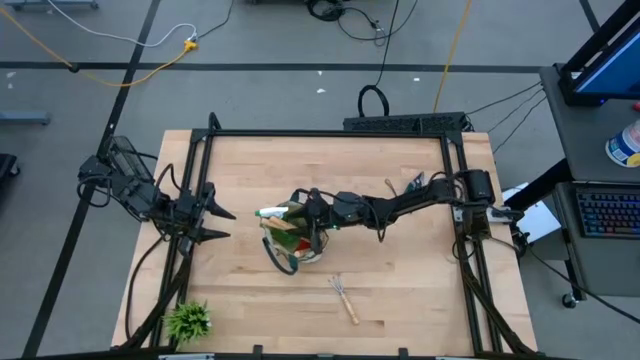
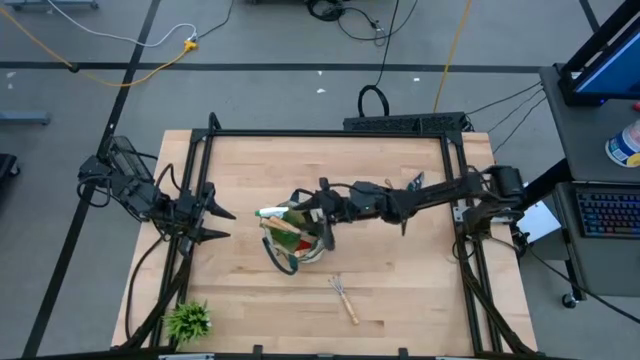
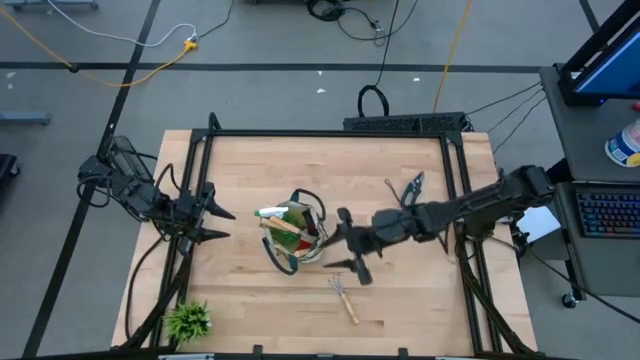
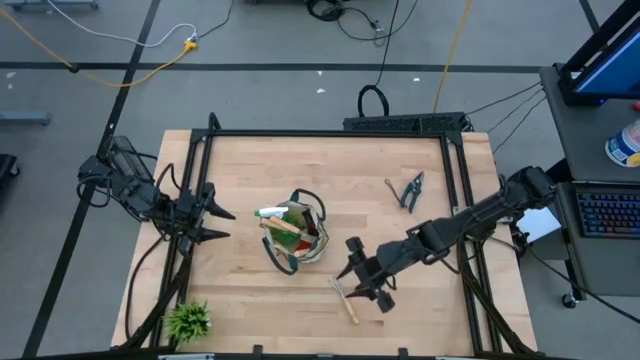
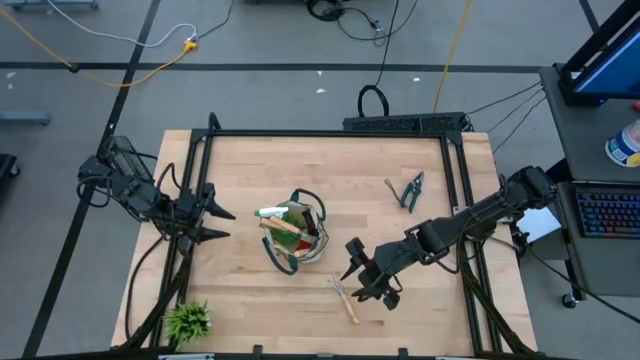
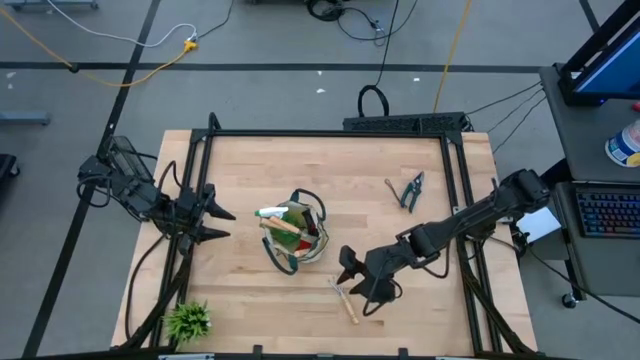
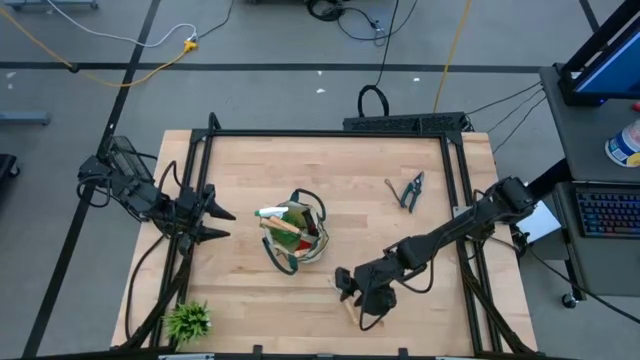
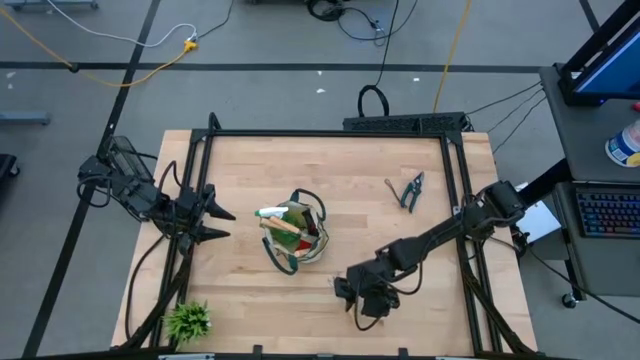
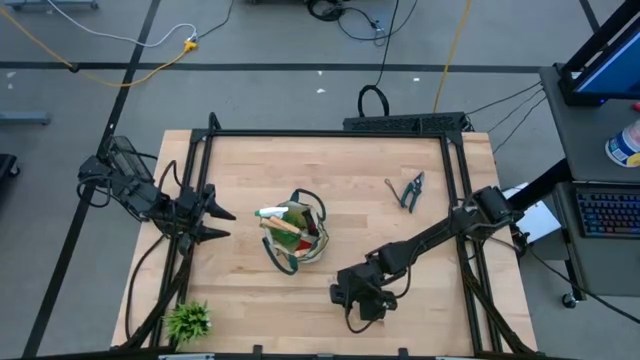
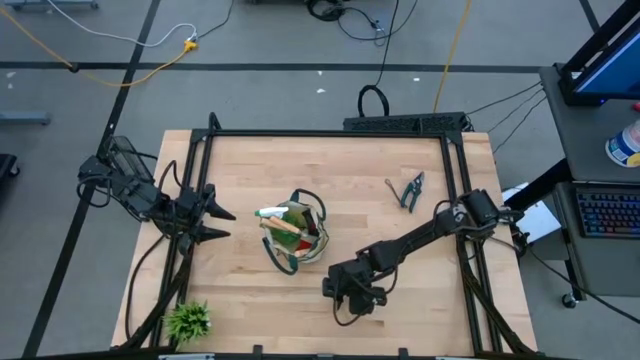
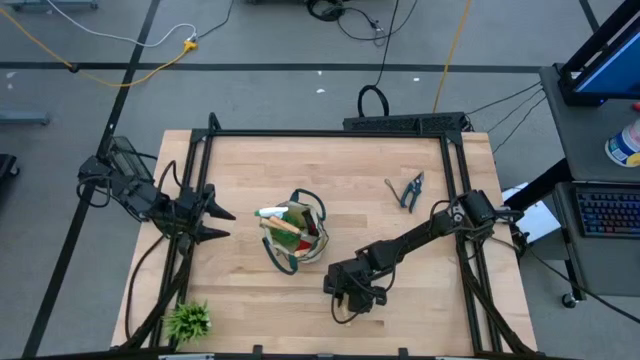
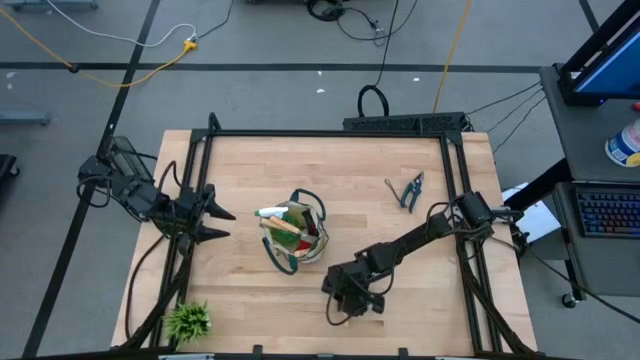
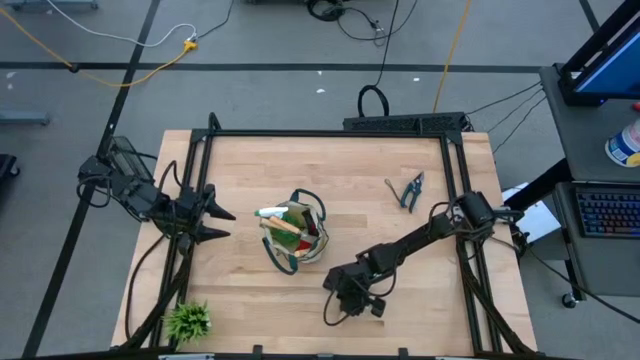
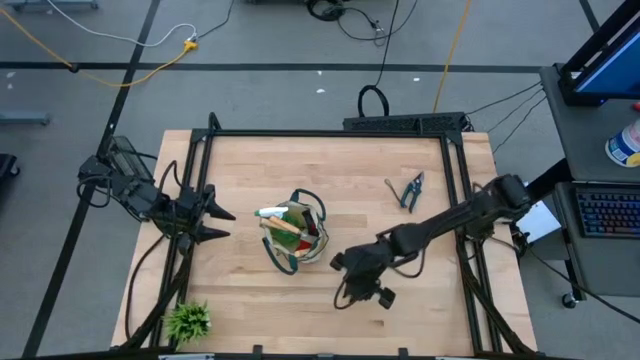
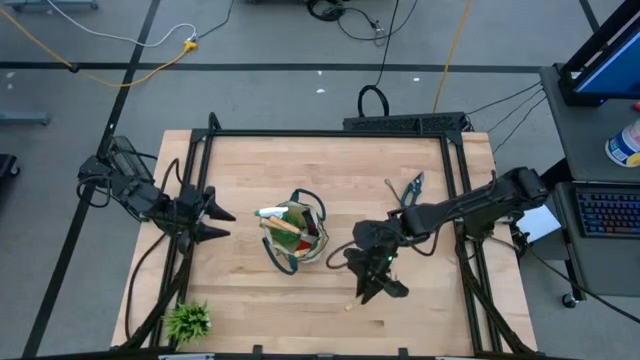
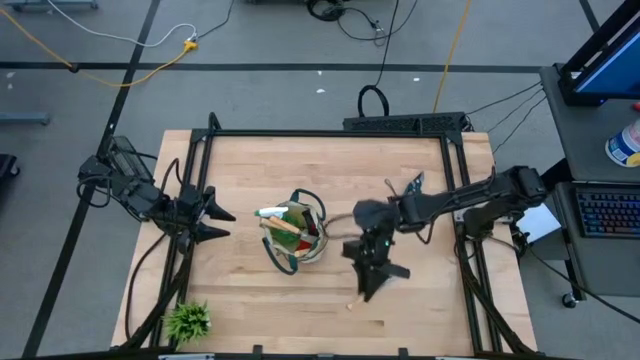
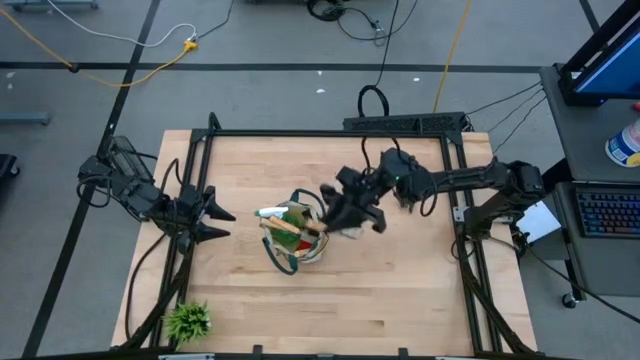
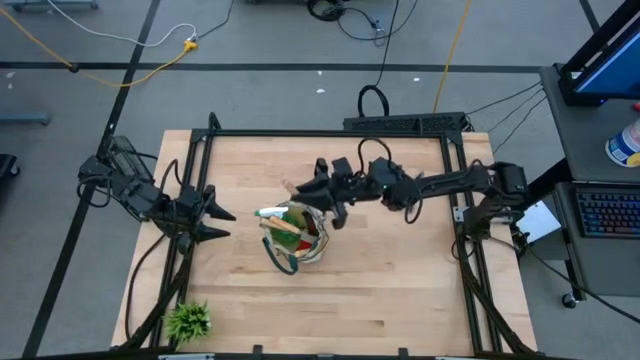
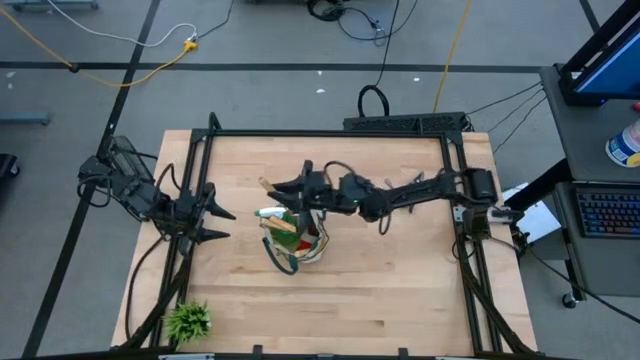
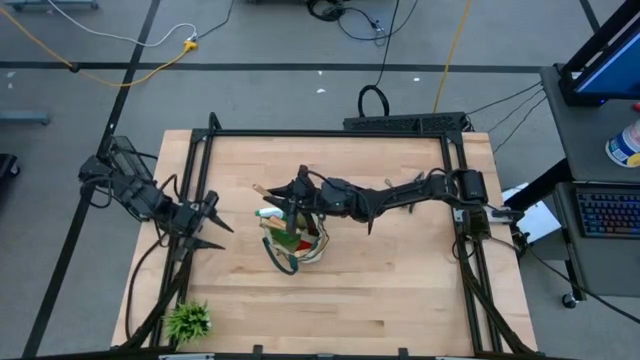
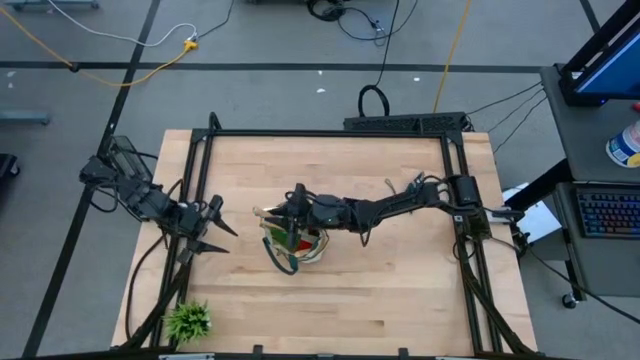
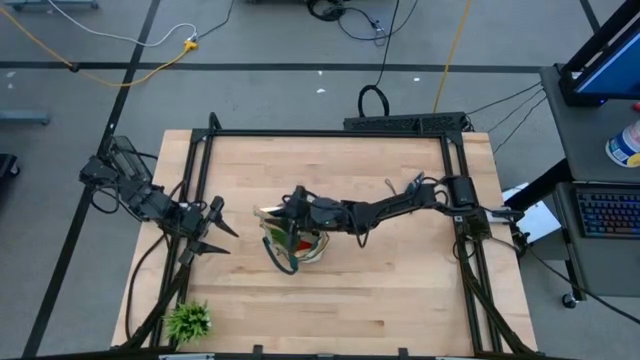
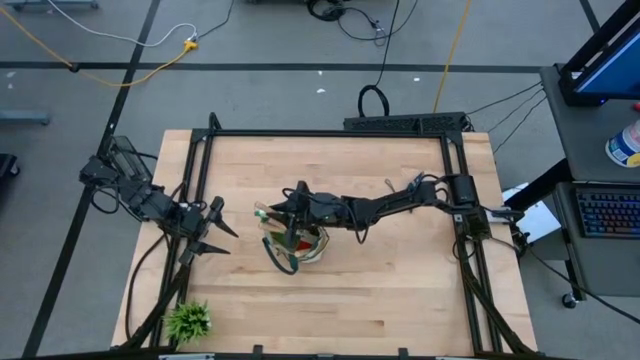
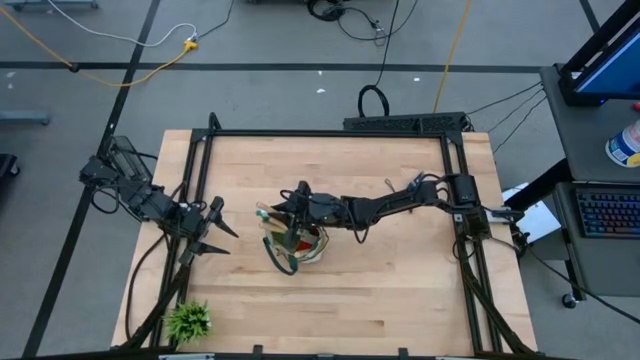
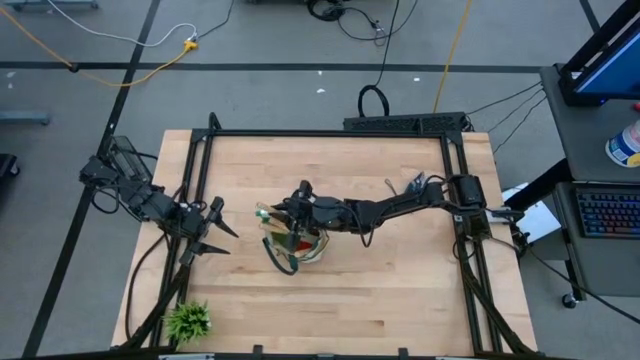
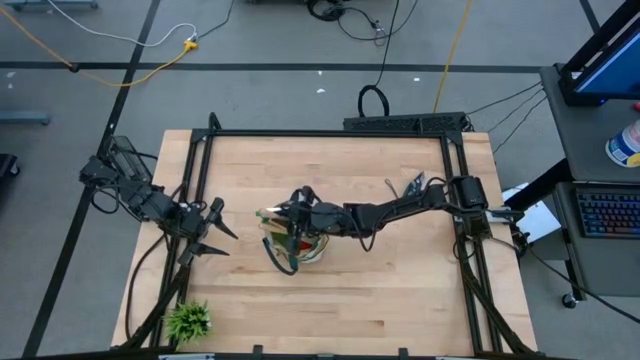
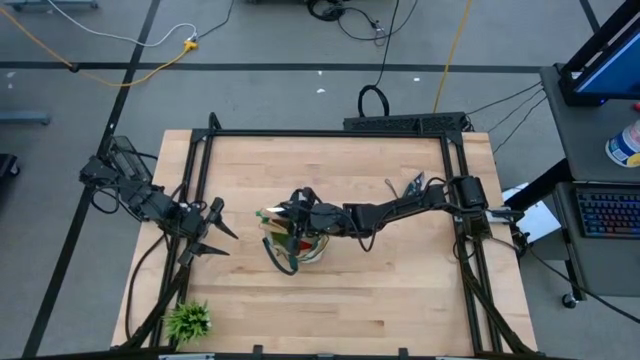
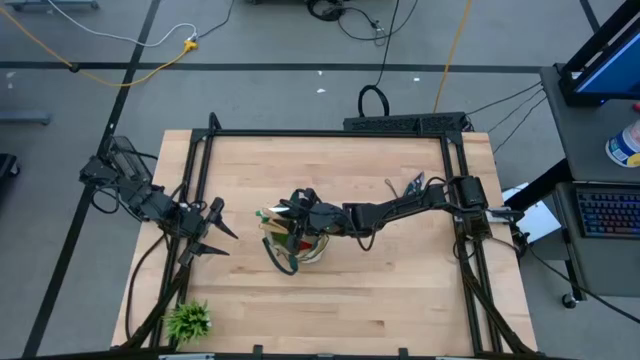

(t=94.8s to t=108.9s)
Task: Pick & Place Garden tools in Gardening bag
Put the hand rake into the gardening bag

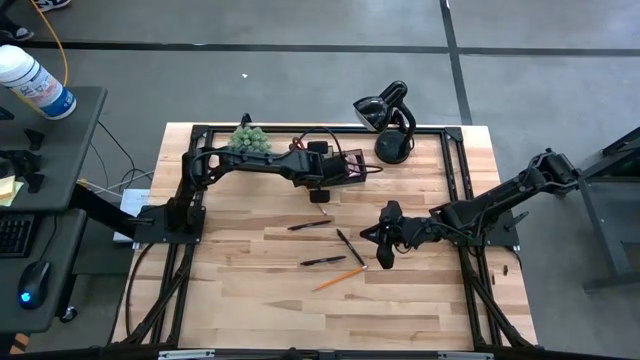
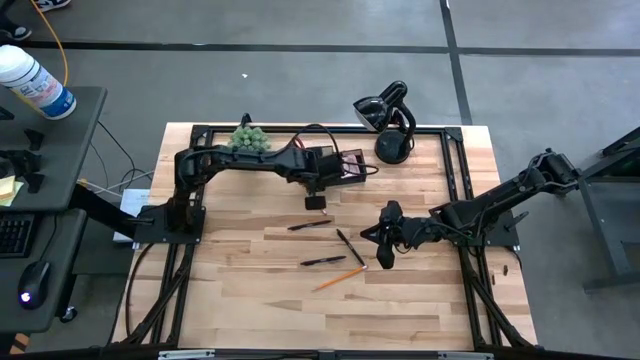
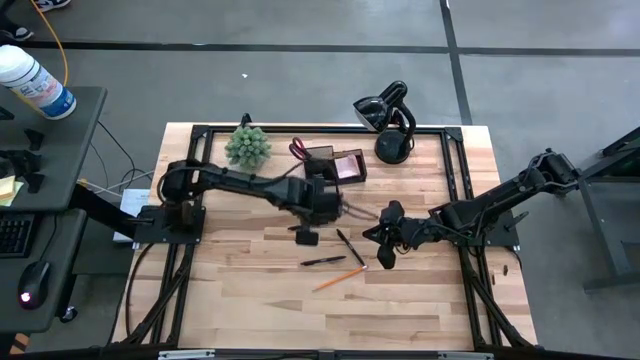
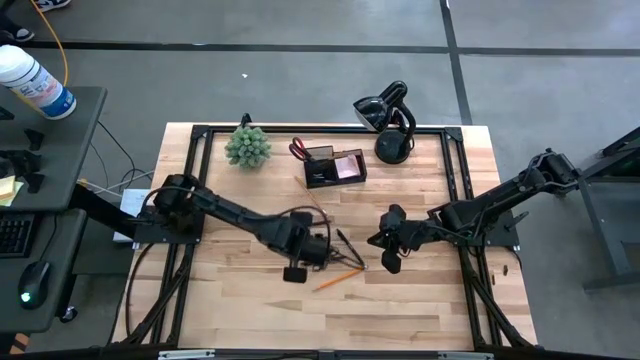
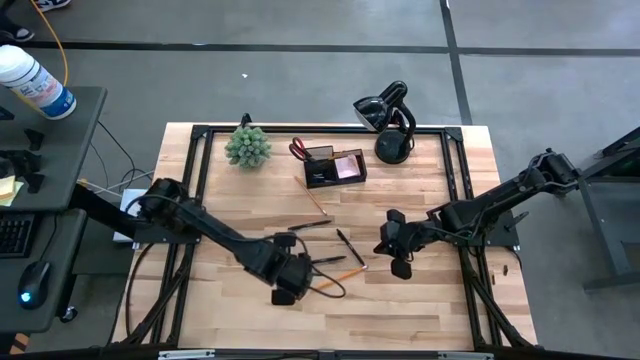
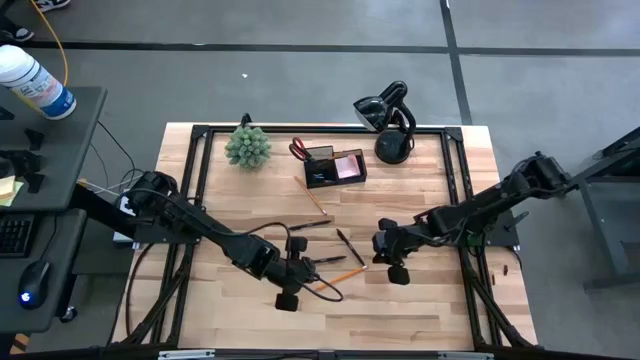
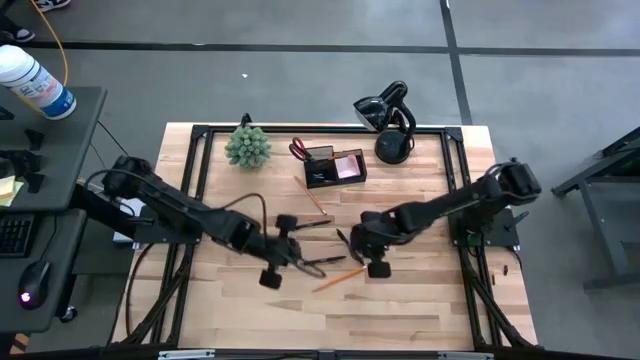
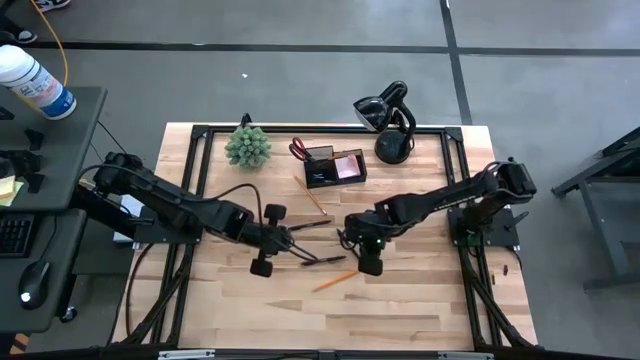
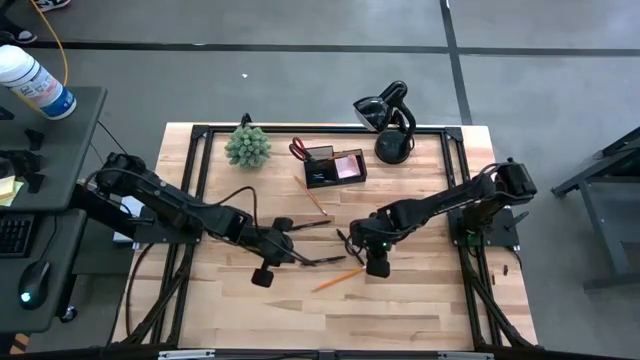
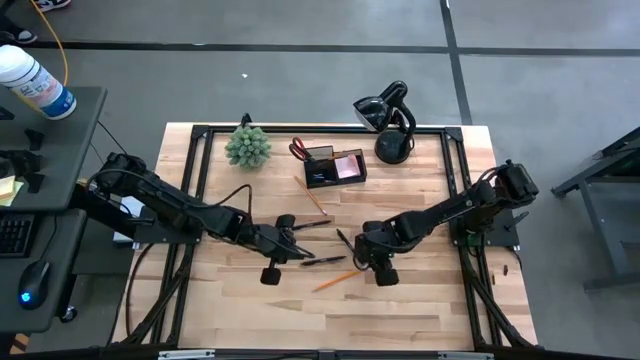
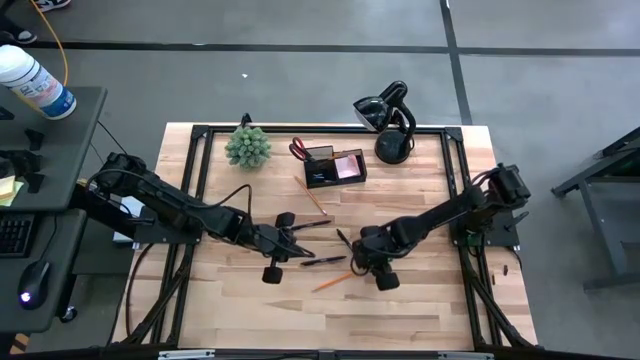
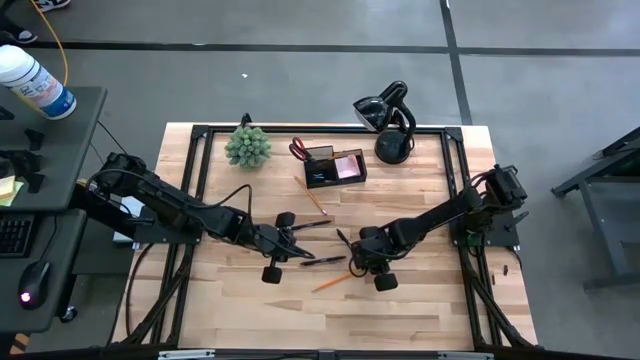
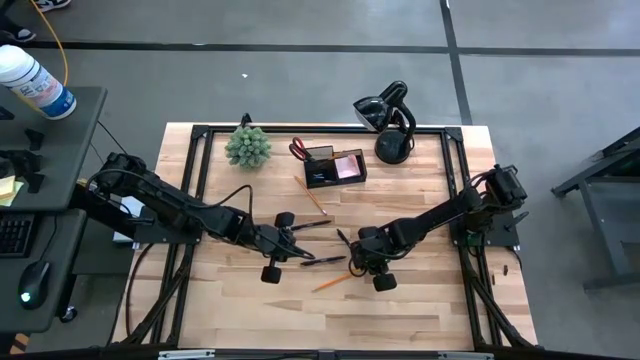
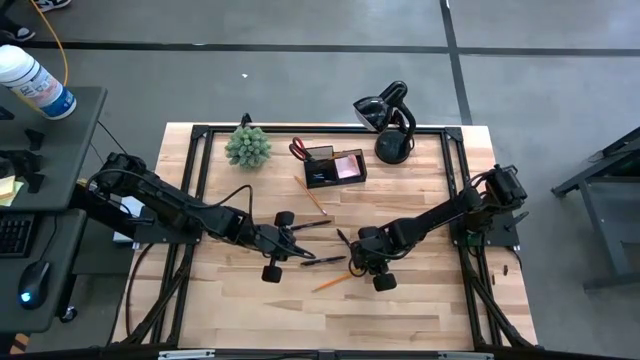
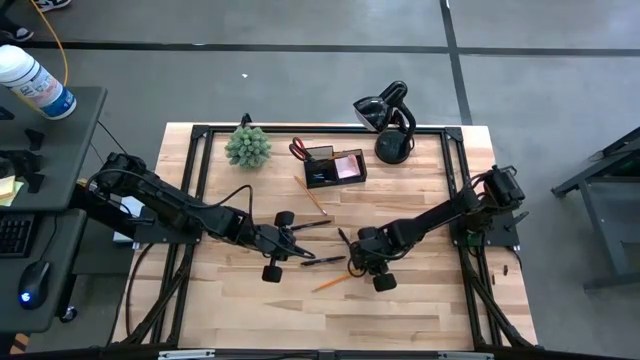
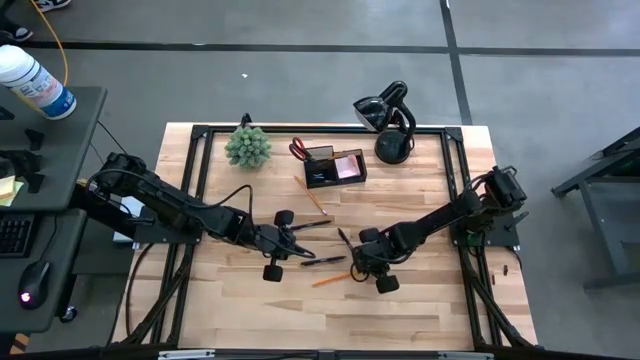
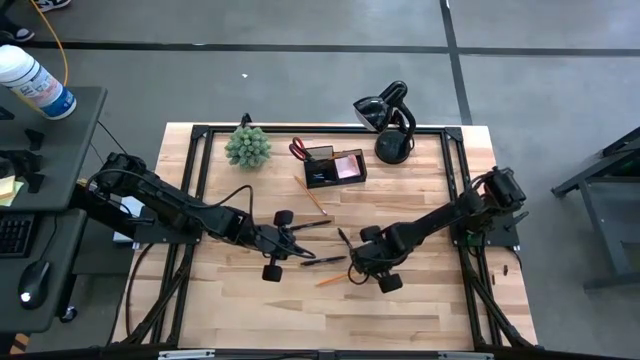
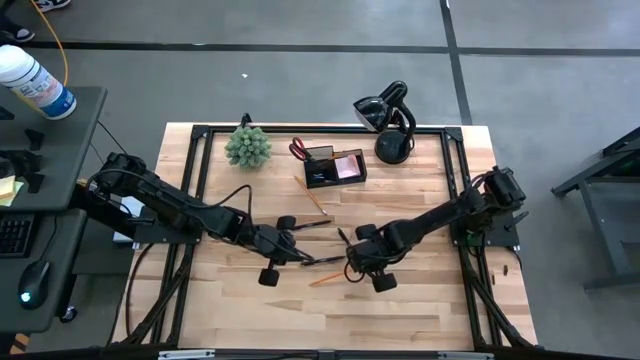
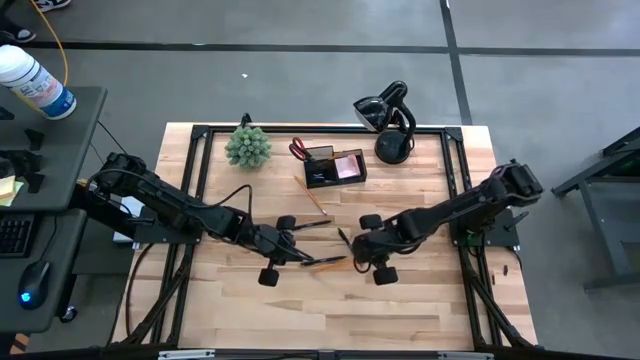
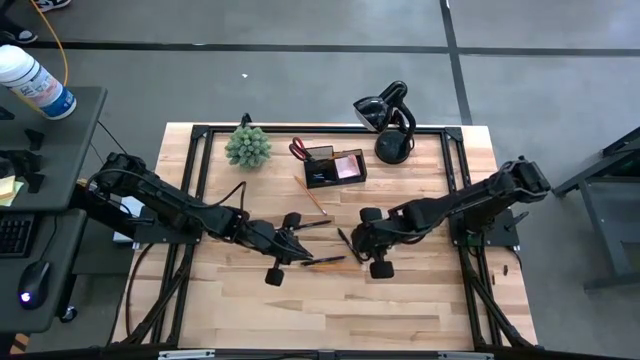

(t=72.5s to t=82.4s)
Task: Pick and place office supplies into organizer
Put the bottom orange pencil into the black desk organizer
